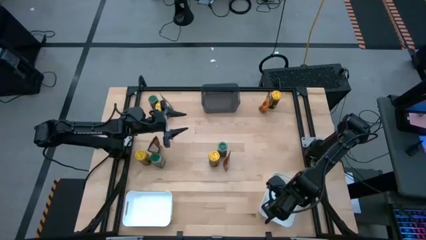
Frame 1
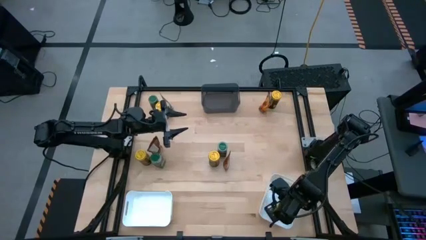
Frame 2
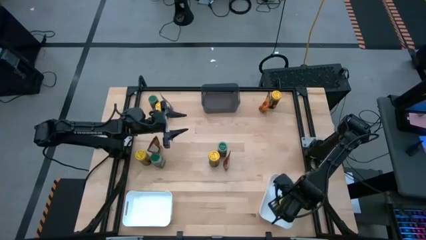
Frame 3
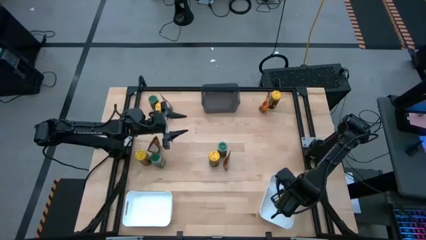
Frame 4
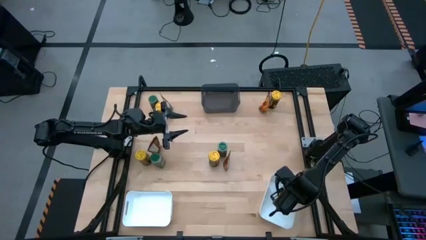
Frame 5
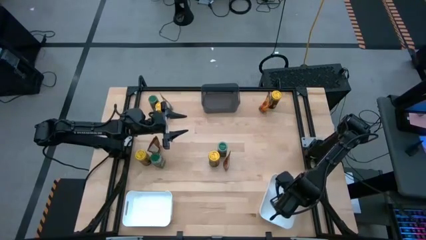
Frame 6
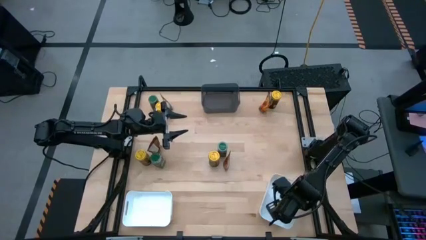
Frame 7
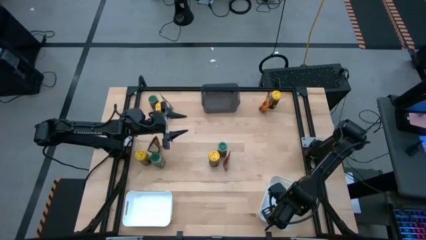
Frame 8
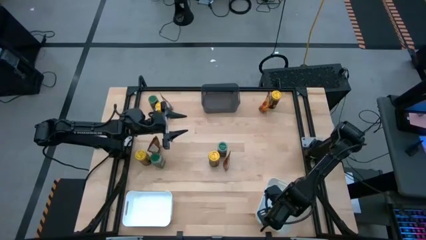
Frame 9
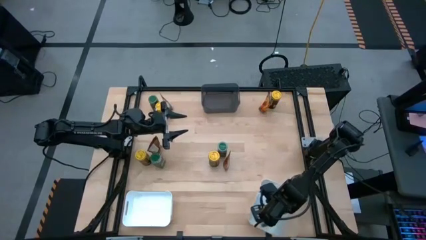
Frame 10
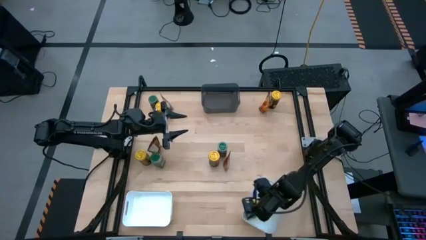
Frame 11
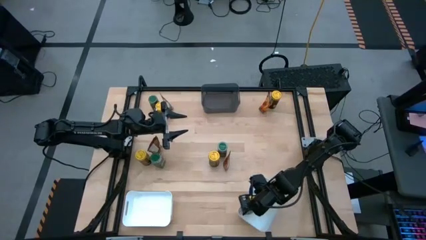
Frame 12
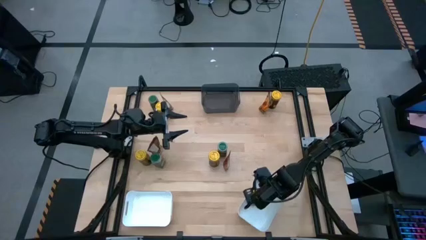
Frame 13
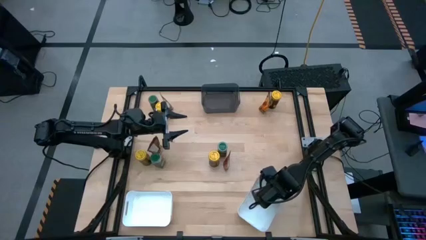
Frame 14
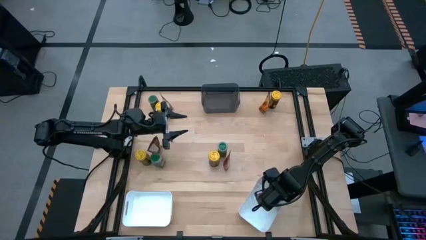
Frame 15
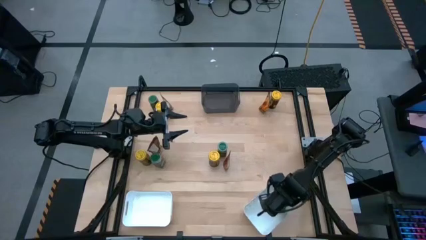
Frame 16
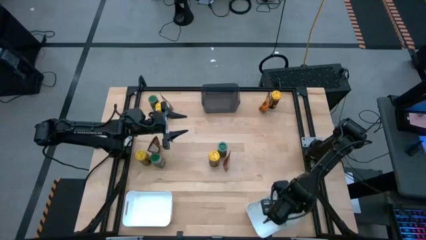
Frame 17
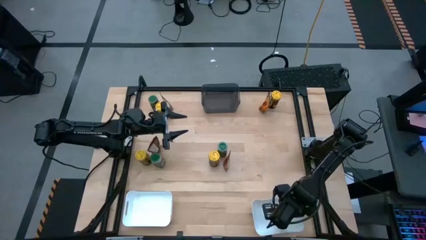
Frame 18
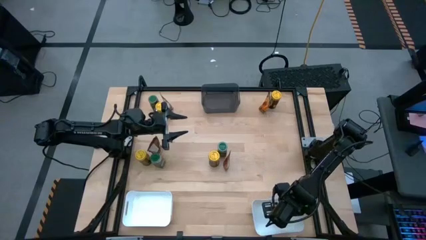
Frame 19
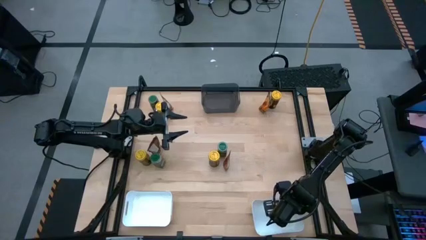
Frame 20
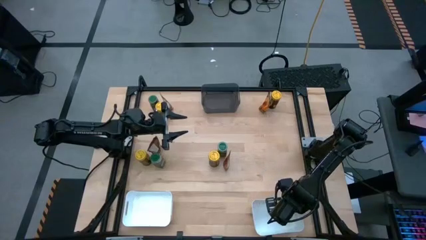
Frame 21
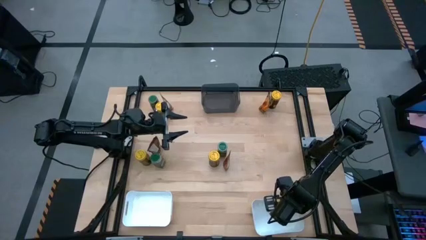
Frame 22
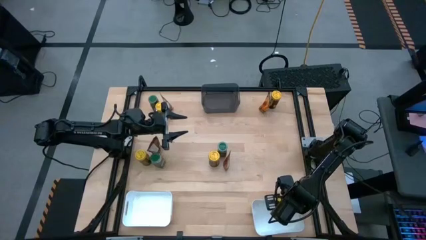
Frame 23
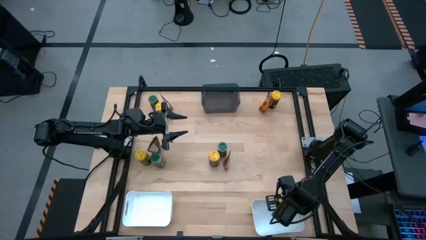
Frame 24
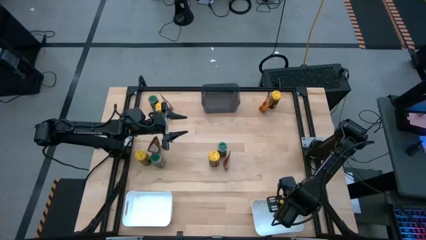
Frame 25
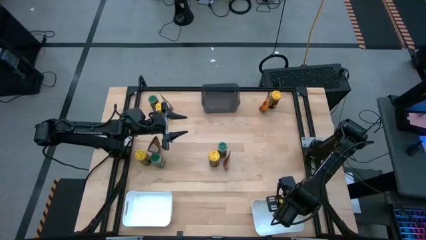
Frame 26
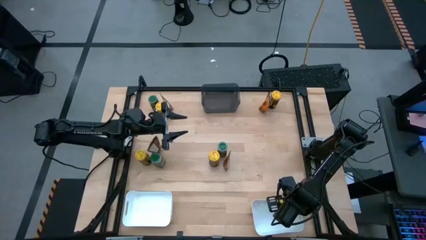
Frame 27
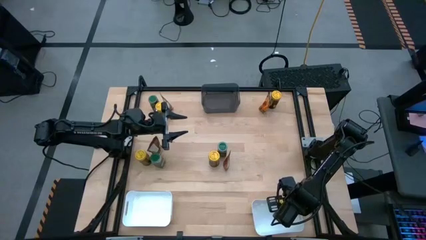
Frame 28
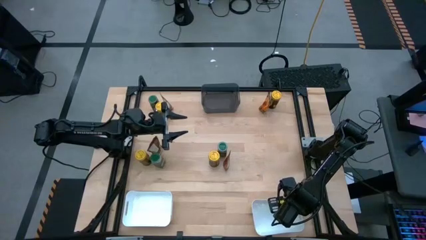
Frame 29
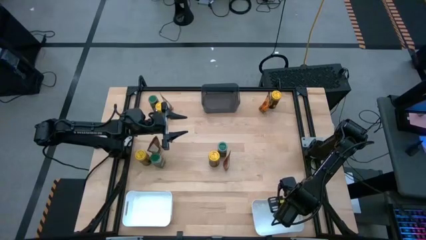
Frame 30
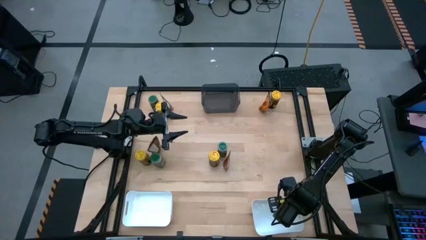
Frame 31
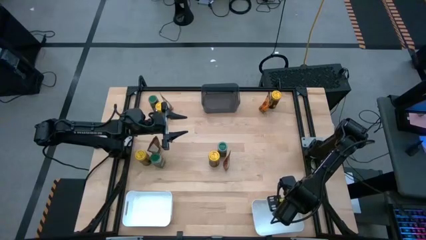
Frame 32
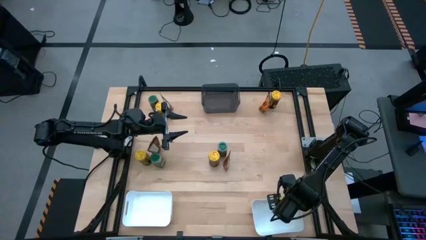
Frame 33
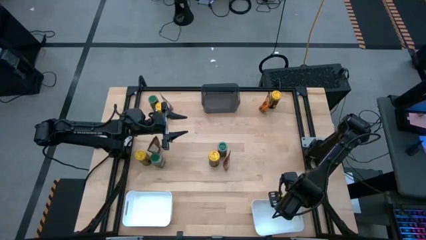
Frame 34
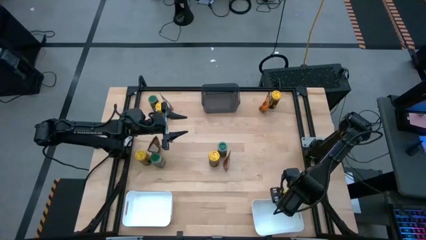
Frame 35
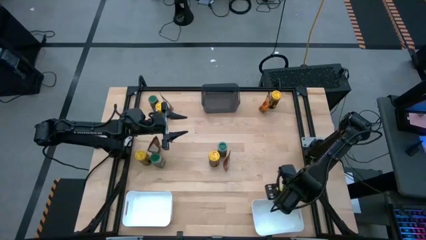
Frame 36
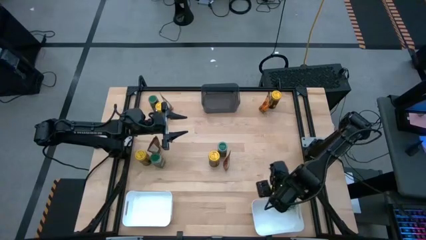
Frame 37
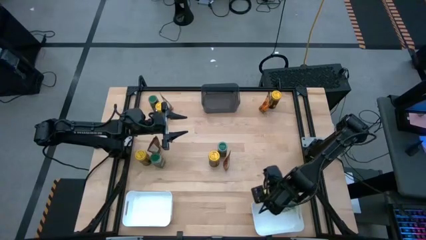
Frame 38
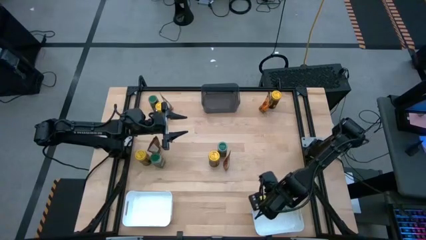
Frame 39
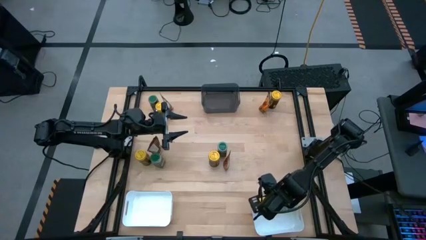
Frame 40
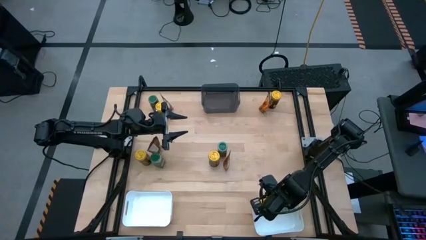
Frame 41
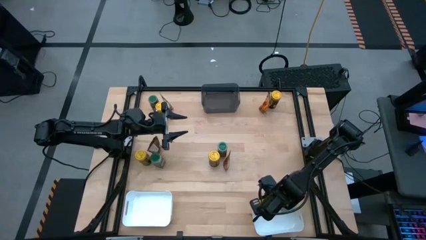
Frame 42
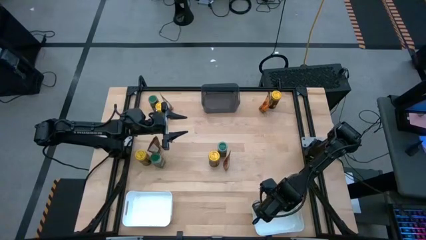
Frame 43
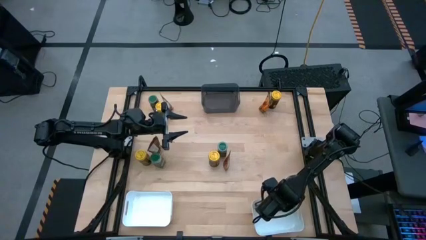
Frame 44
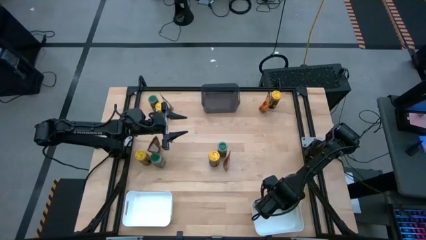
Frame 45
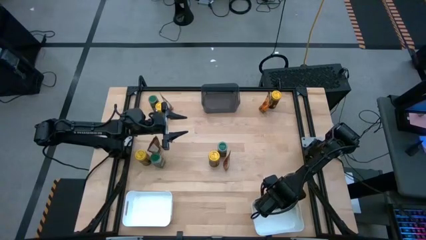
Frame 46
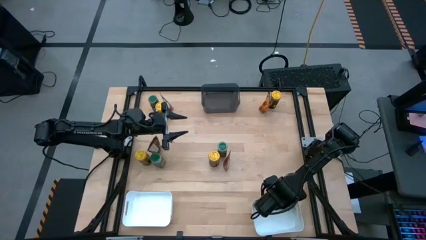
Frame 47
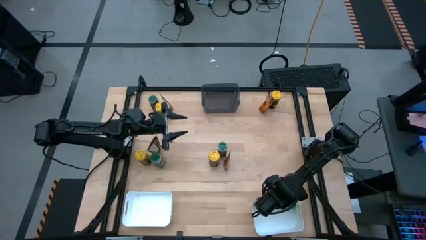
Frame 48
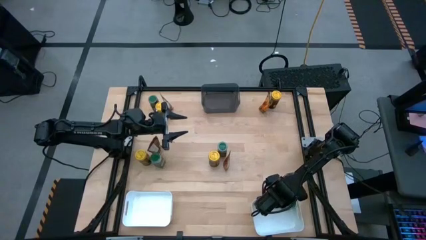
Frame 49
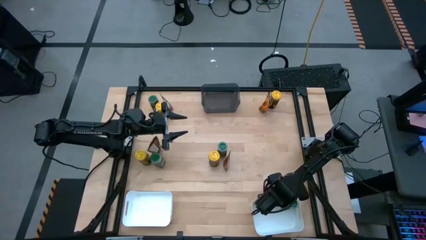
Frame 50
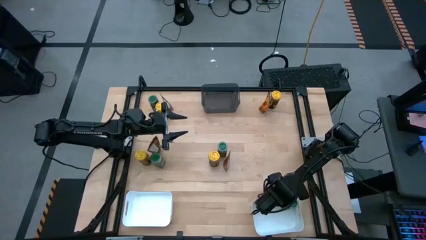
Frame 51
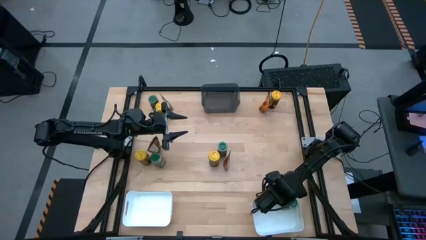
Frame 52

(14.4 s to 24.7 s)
Task: Sort spices by type
Put the top right green seasoning bottle into the right white bin

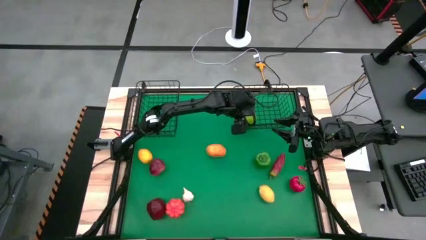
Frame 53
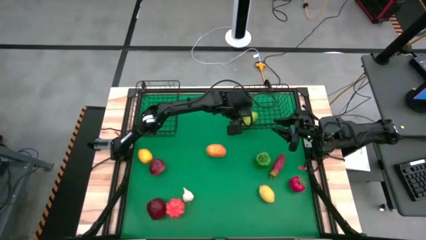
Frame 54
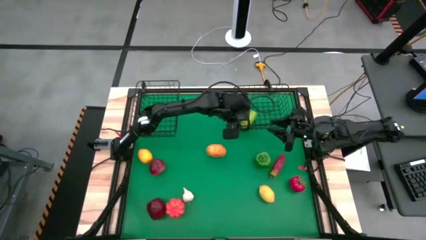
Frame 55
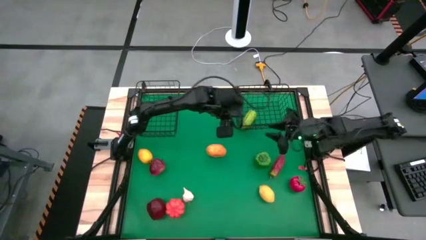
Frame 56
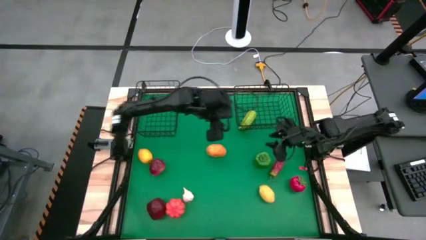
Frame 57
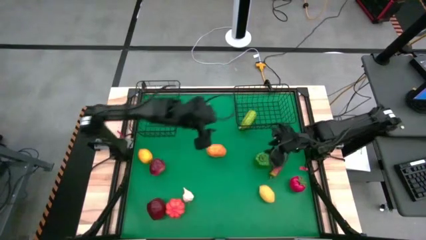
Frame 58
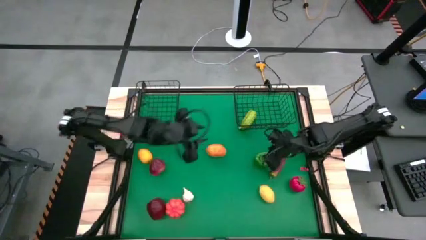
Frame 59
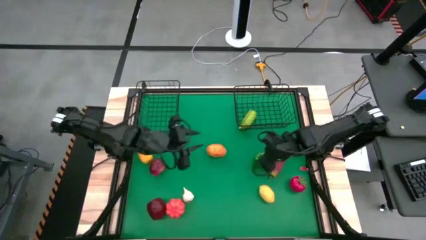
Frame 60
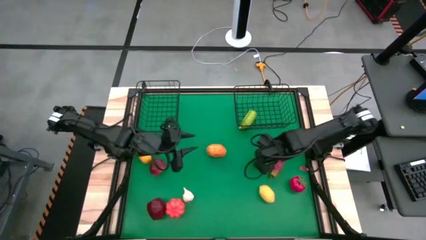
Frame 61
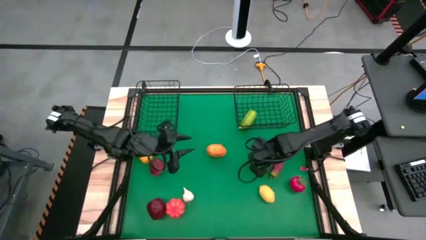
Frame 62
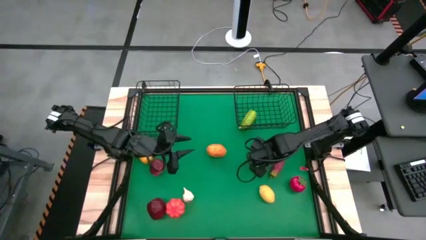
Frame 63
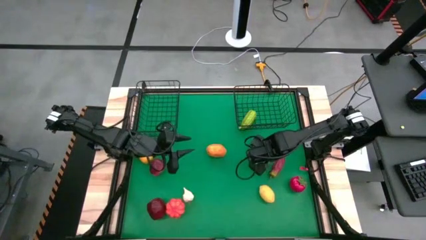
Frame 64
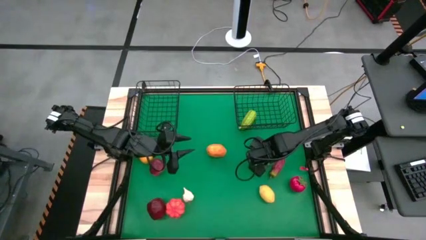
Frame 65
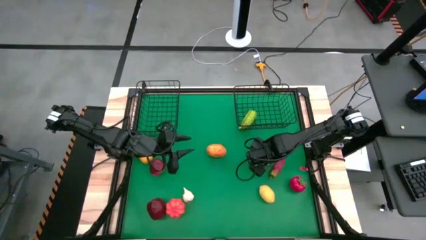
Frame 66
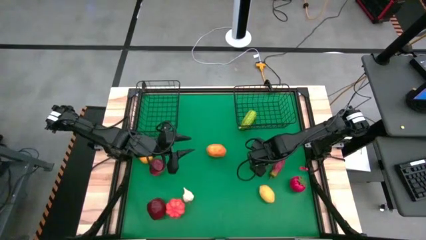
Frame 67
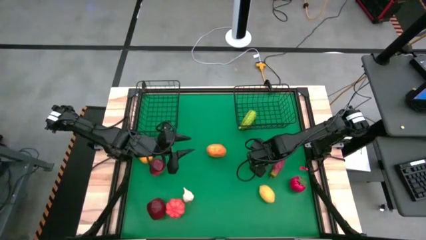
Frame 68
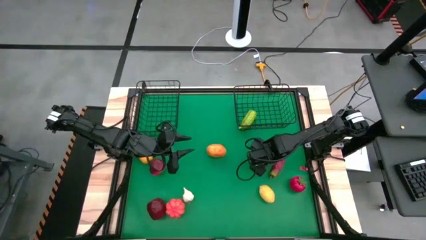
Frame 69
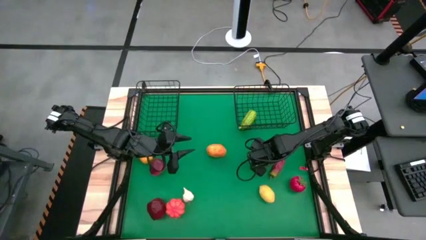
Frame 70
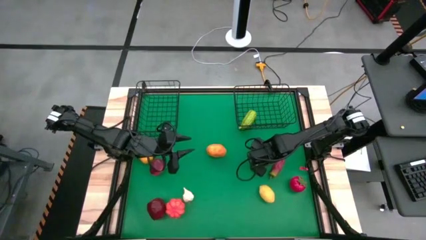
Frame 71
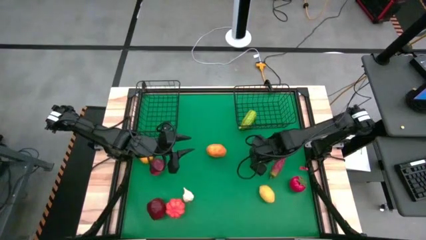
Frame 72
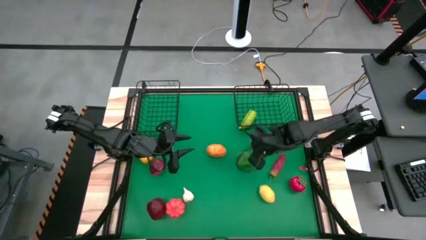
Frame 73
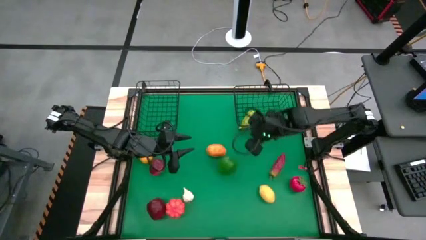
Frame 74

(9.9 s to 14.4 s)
Task: Sort produce into baskets
Put the green bell pepper into the right wire basket
